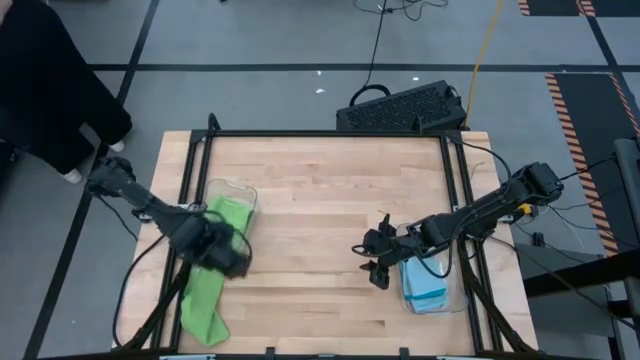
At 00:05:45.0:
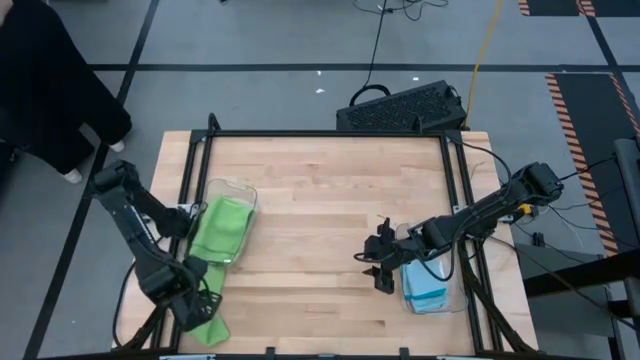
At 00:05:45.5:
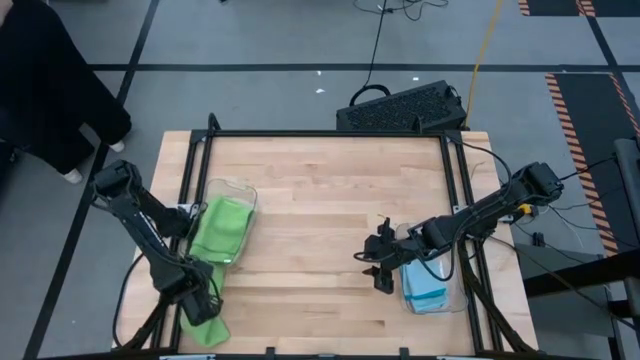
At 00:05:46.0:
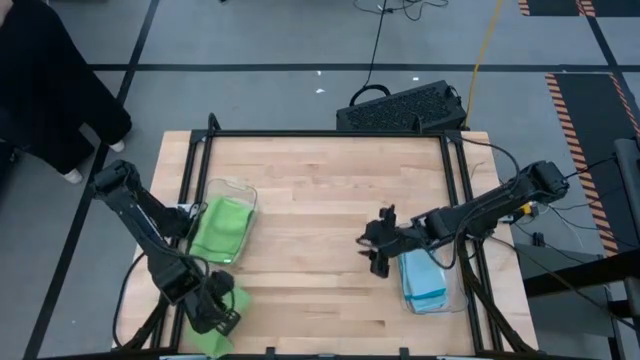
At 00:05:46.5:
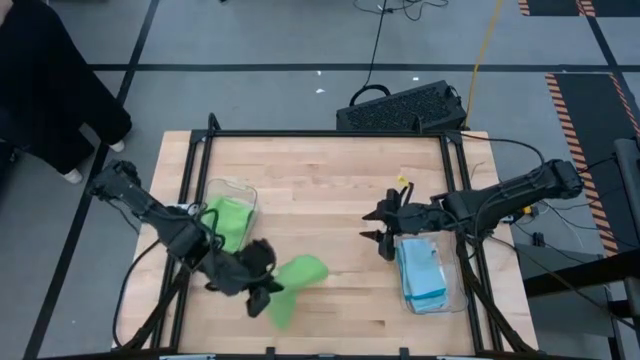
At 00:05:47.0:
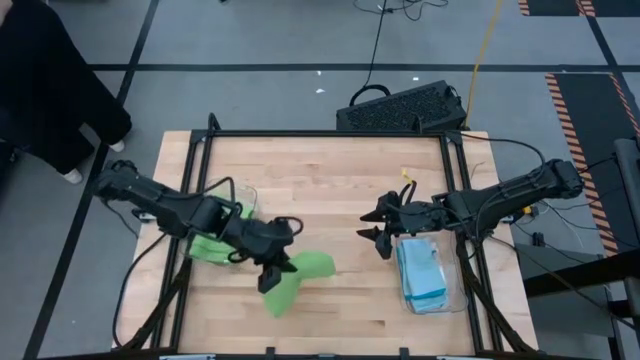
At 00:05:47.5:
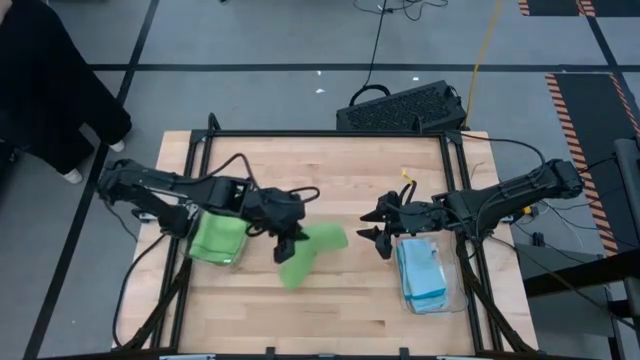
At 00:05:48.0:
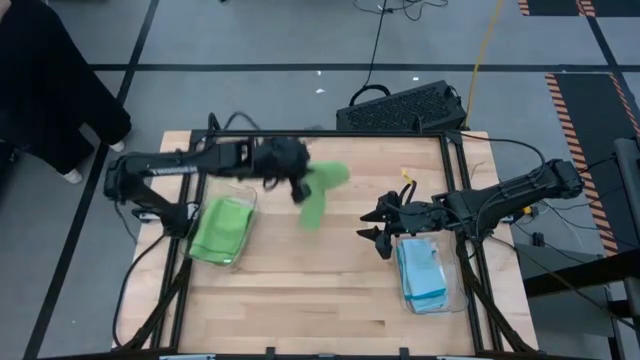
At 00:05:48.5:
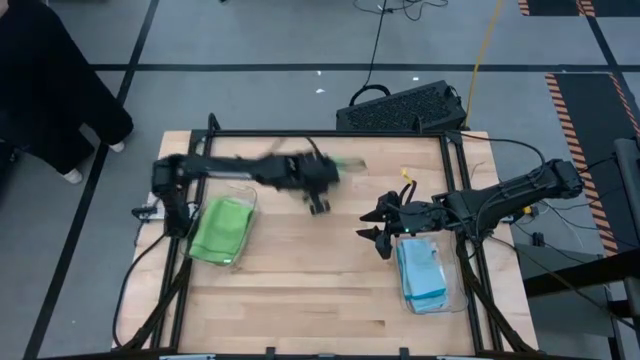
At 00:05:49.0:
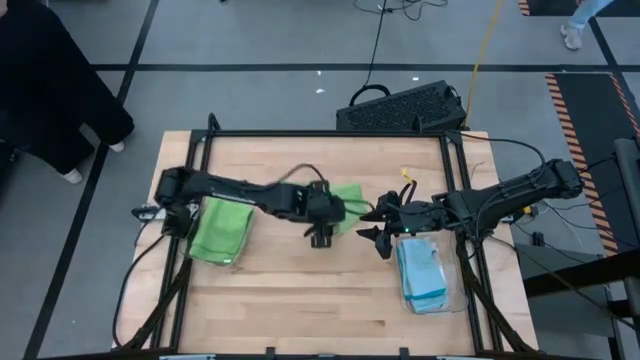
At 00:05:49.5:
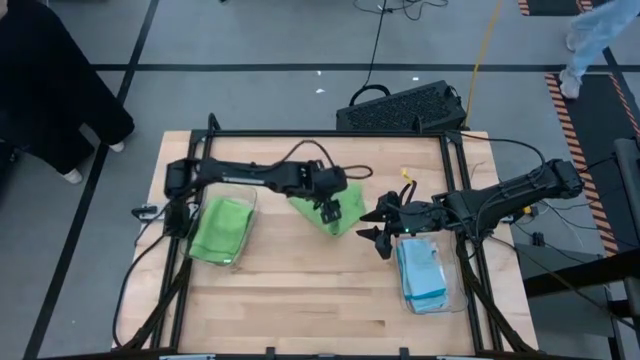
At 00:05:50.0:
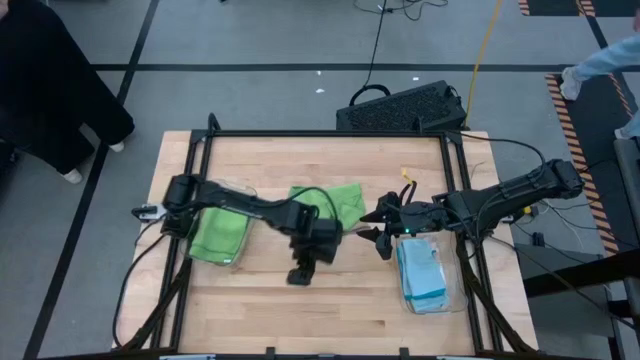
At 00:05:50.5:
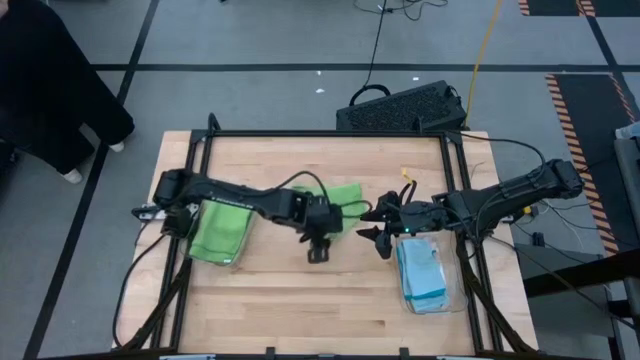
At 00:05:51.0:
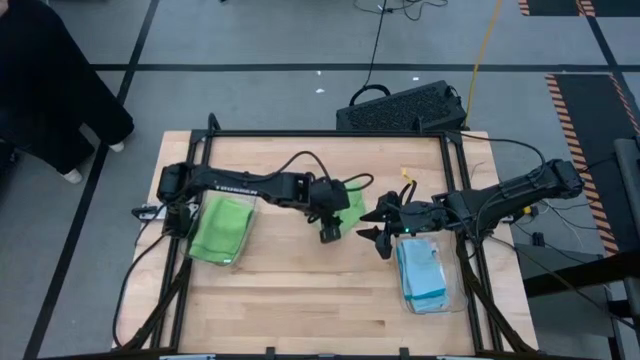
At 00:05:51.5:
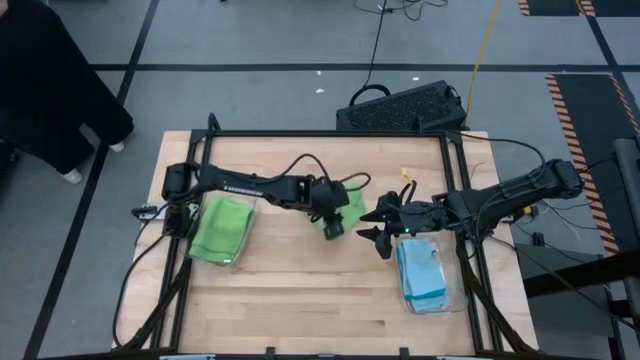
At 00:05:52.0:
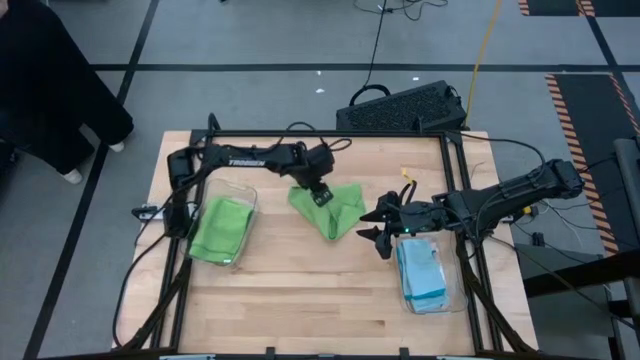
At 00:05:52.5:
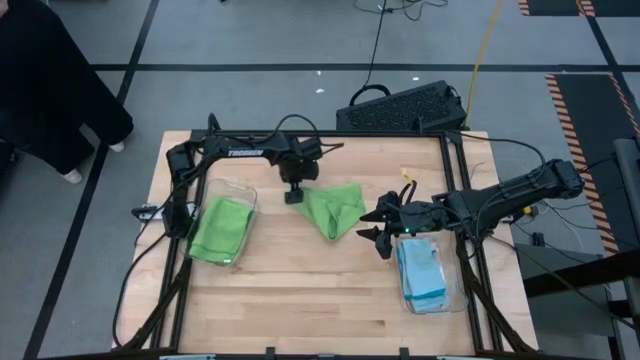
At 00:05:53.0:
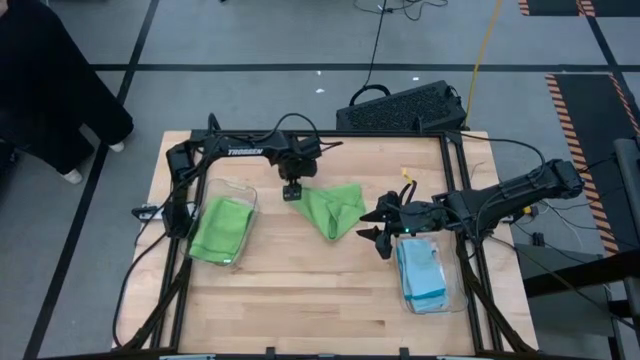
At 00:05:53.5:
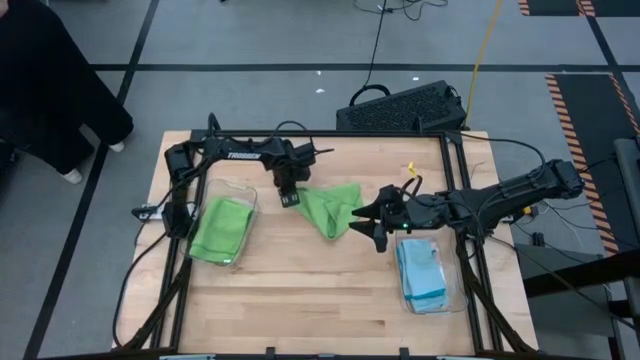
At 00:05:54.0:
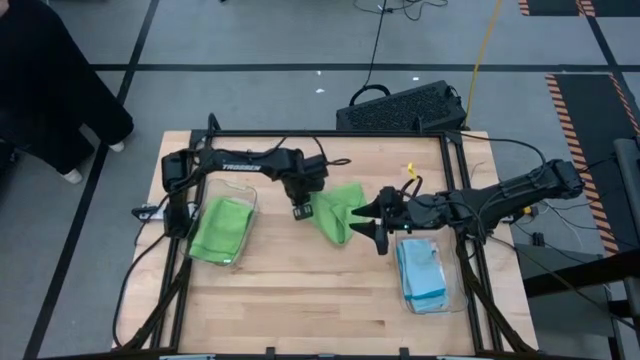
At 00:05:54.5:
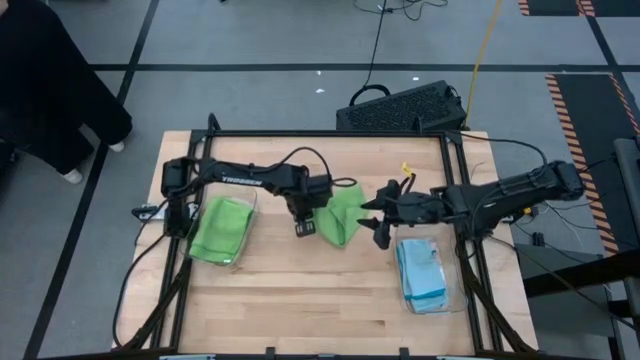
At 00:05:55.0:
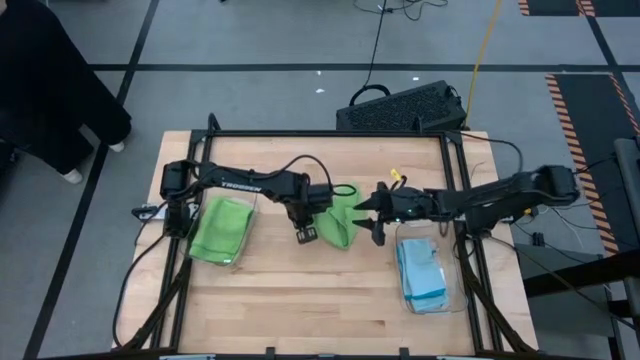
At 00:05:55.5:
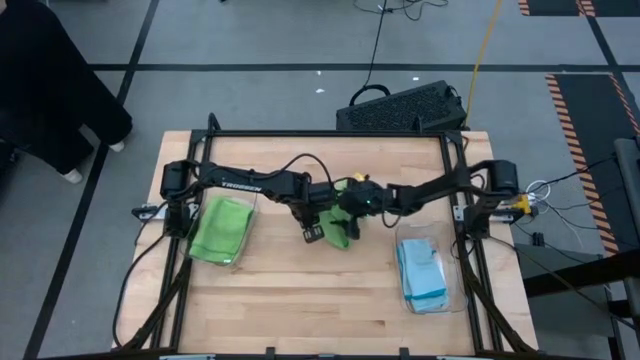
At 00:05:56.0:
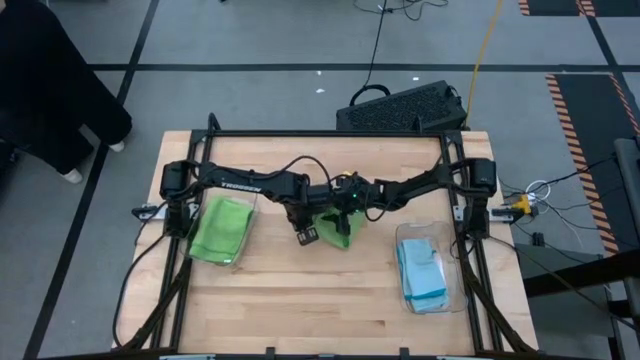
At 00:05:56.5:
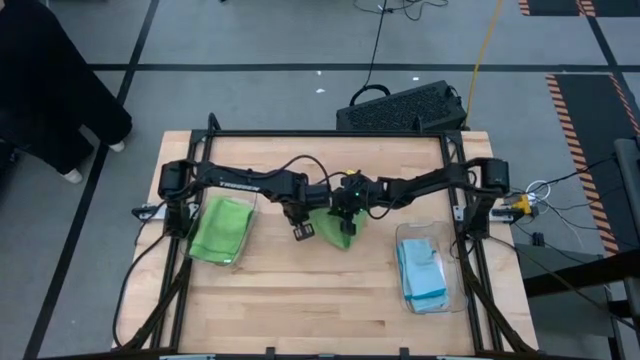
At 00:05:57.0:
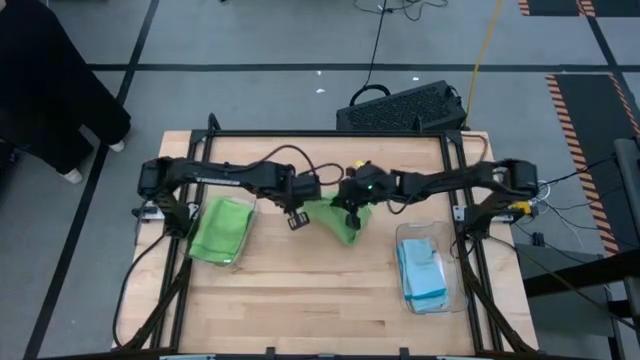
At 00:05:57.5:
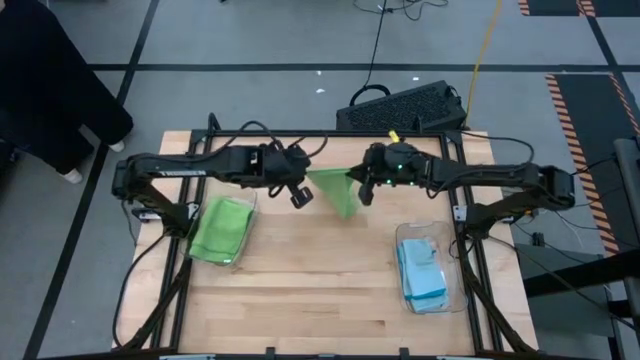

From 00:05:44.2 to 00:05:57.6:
Task: Sort microfiber towel by color & place in baskets
Fold the green microfiber towel

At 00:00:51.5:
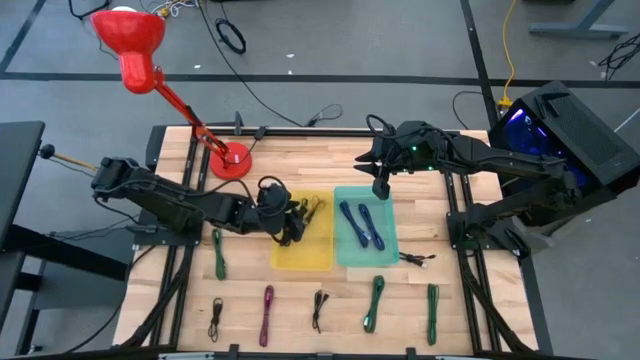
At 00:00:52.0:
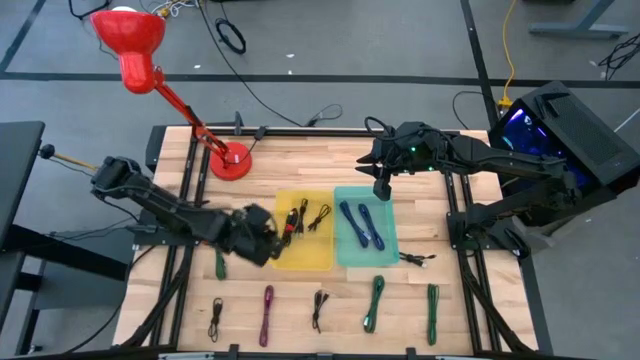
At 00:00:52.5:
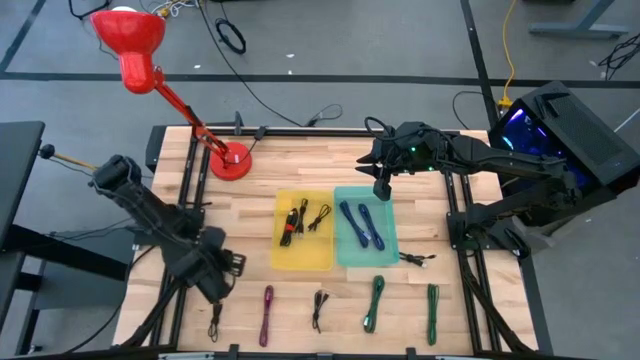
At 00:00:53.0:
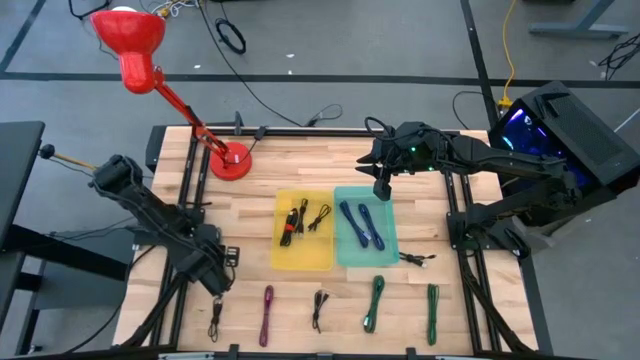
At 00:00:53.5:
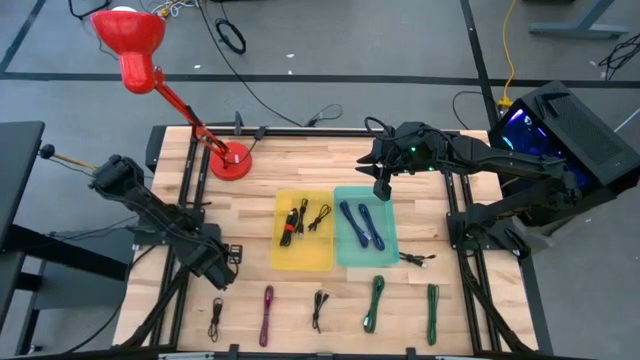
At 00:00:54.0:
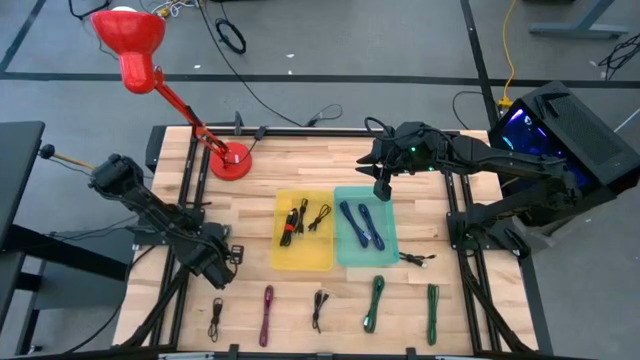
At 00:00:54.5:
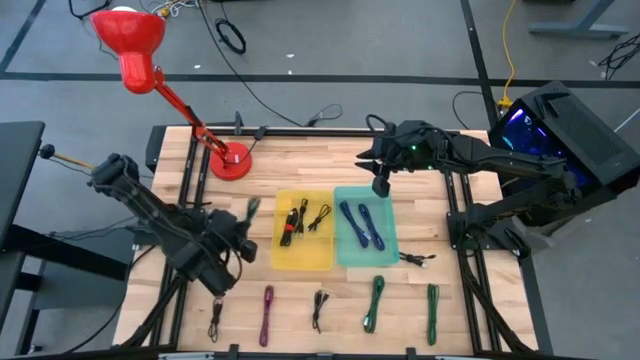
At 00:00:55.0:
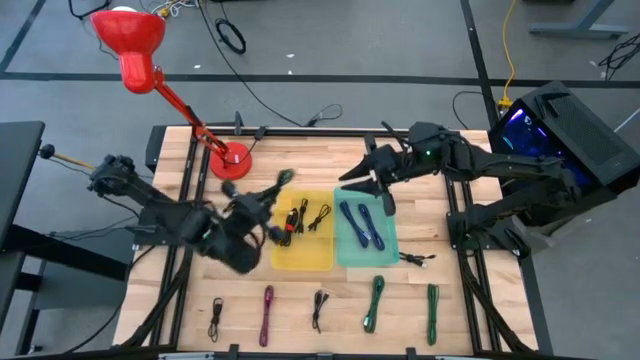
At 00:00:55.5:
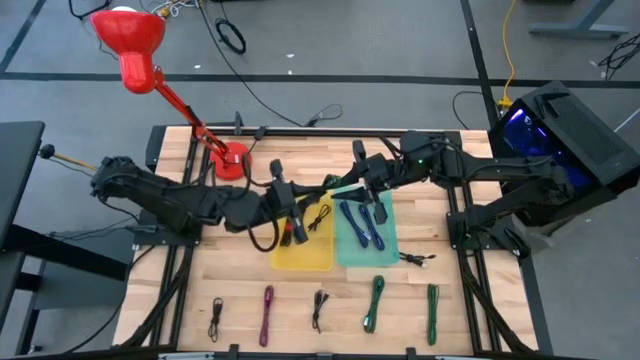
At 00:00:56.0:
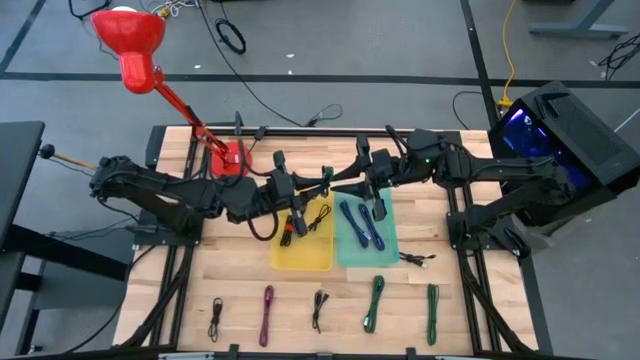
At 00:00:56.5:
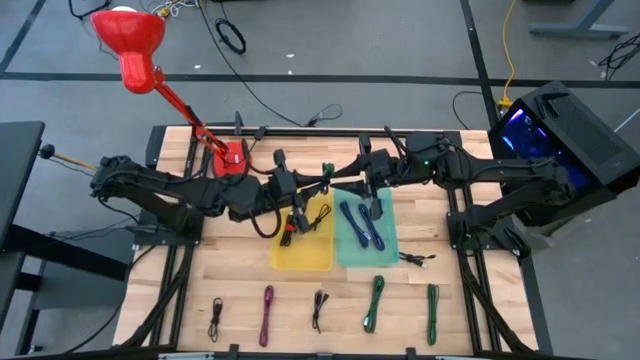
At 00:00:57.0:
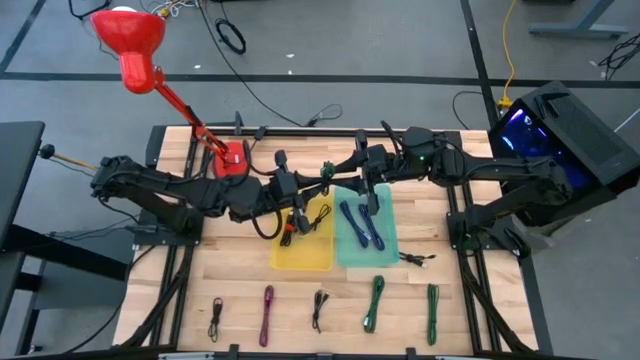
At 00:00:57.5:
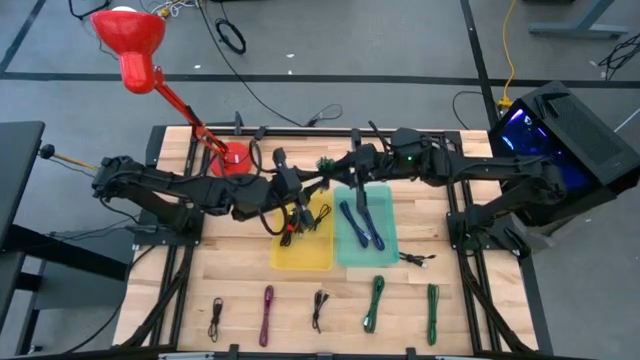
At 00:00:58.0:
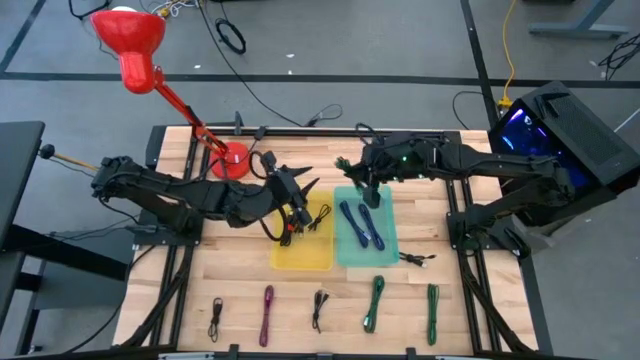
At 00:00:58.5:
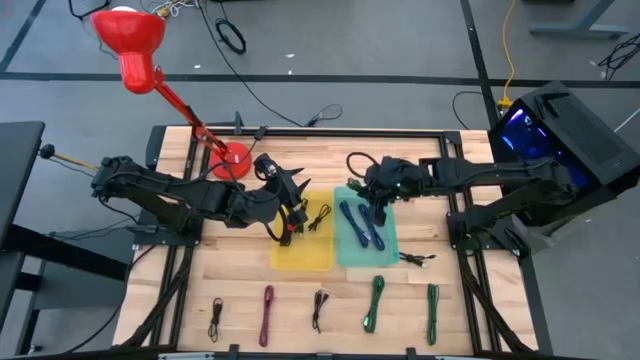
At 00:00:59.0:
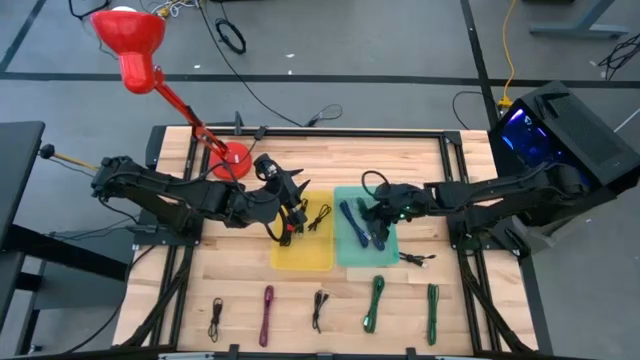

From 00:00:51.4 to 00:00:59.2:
Task: Pick & Place USB Port
Put the top green charger cable into the green bin
